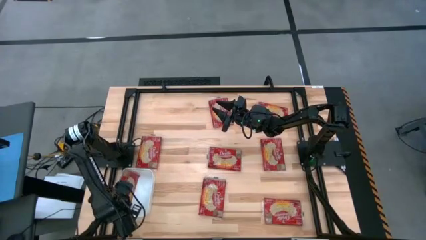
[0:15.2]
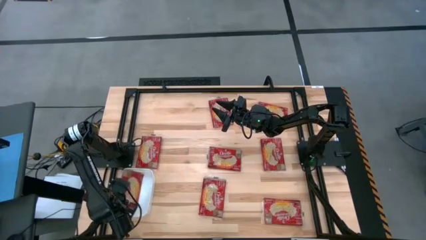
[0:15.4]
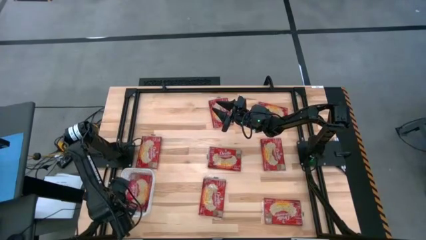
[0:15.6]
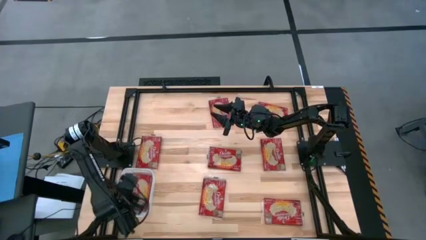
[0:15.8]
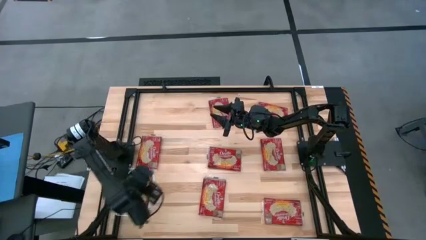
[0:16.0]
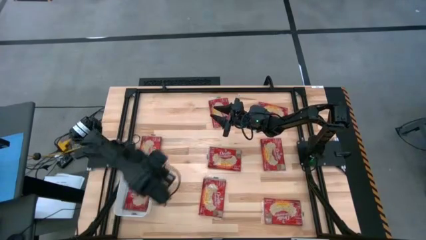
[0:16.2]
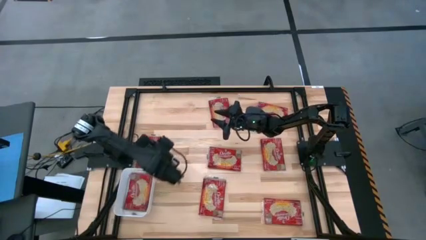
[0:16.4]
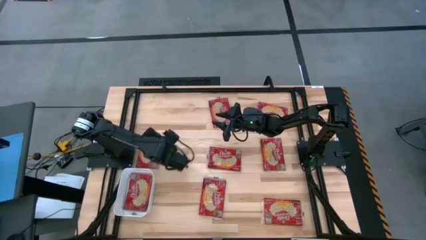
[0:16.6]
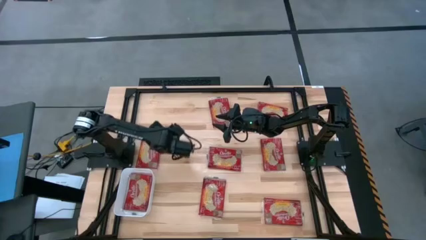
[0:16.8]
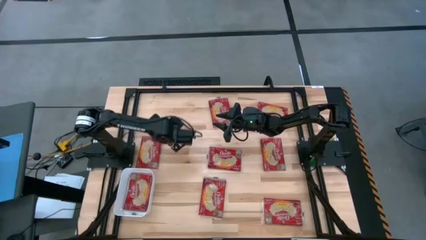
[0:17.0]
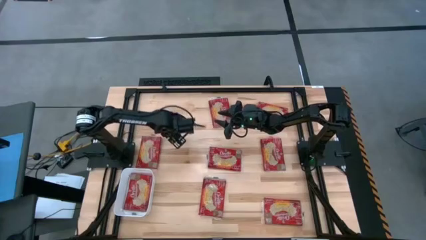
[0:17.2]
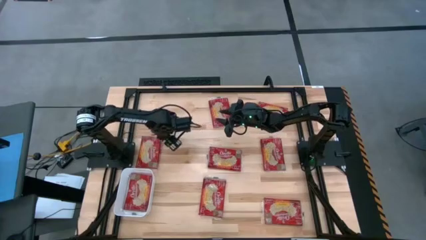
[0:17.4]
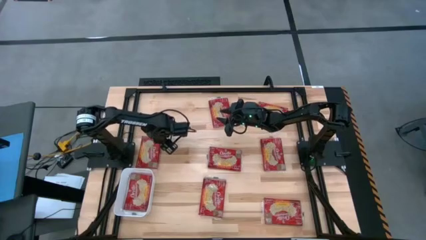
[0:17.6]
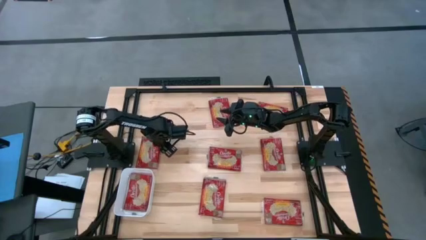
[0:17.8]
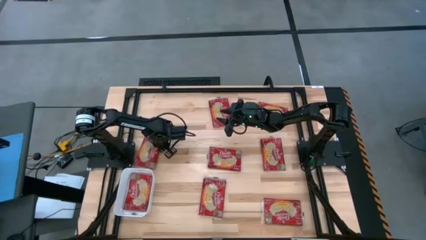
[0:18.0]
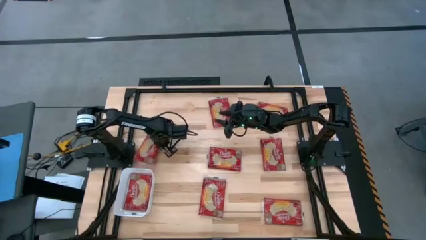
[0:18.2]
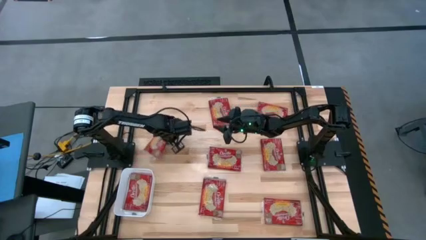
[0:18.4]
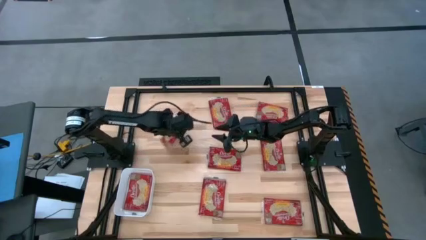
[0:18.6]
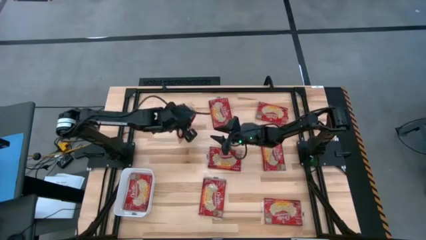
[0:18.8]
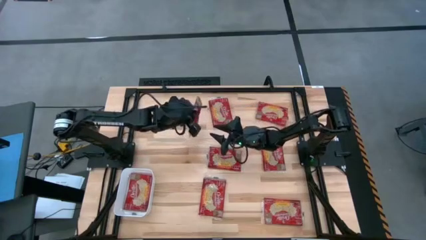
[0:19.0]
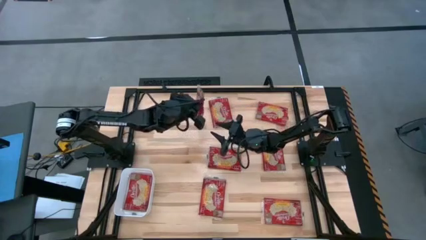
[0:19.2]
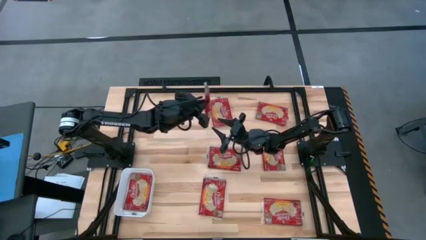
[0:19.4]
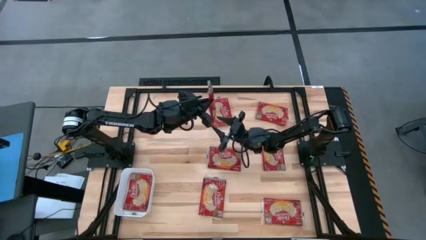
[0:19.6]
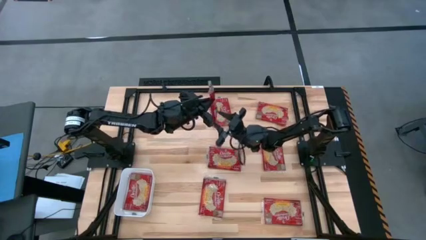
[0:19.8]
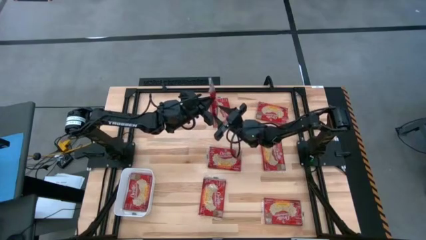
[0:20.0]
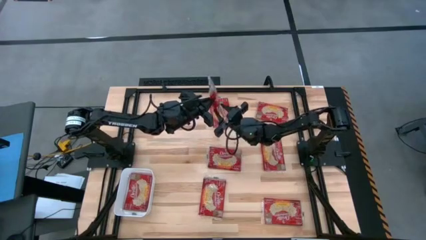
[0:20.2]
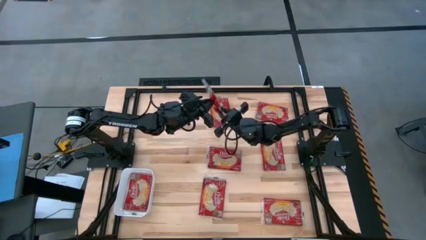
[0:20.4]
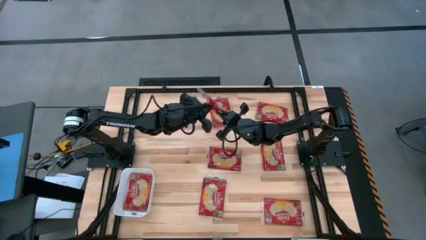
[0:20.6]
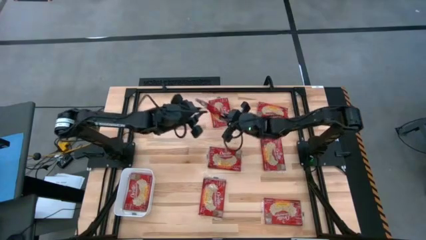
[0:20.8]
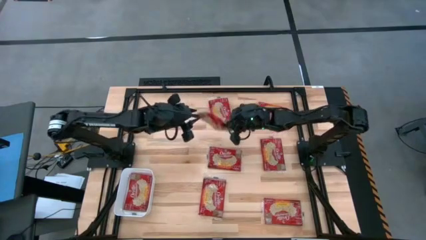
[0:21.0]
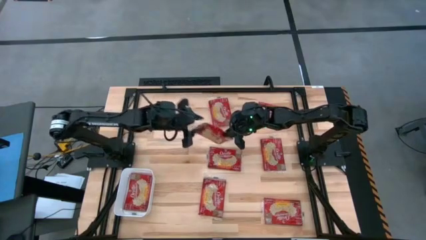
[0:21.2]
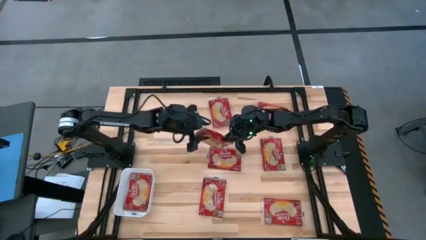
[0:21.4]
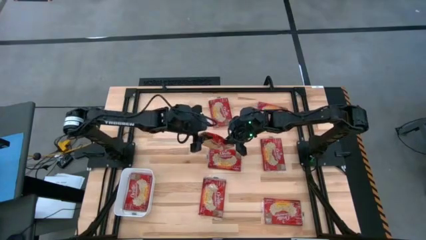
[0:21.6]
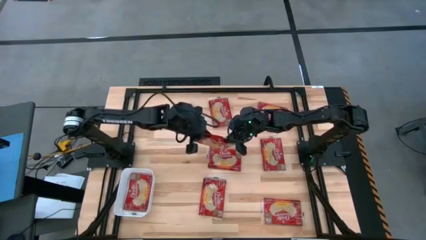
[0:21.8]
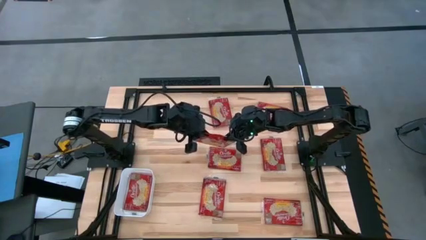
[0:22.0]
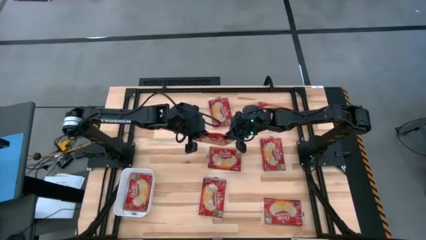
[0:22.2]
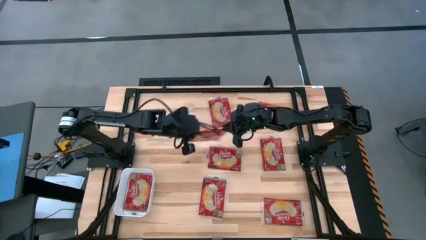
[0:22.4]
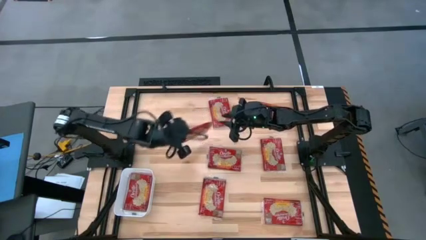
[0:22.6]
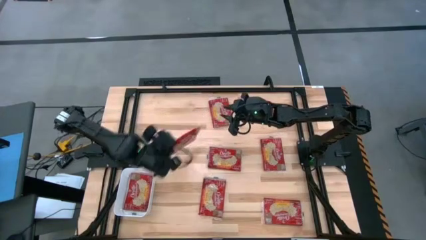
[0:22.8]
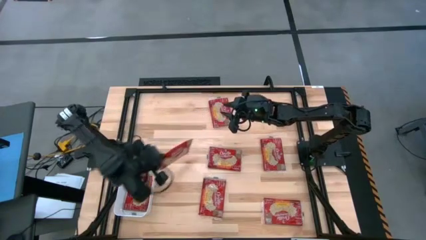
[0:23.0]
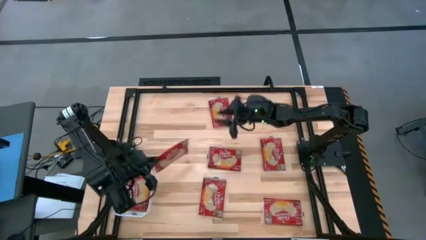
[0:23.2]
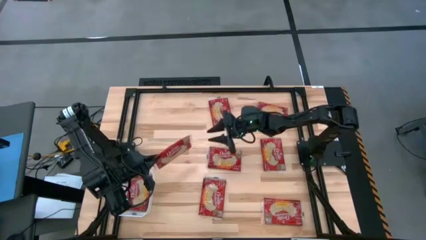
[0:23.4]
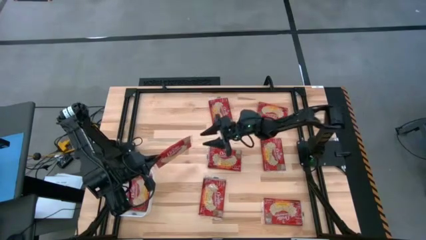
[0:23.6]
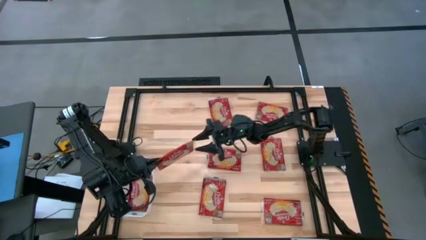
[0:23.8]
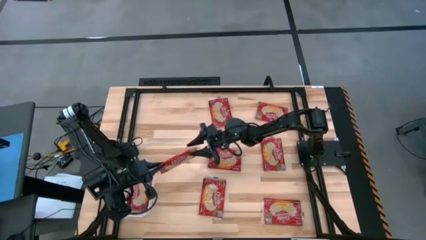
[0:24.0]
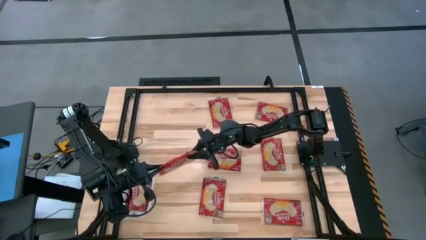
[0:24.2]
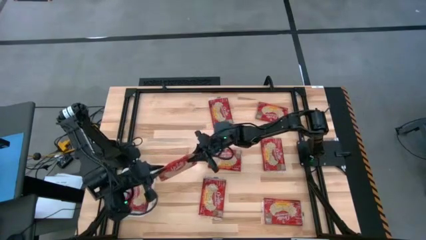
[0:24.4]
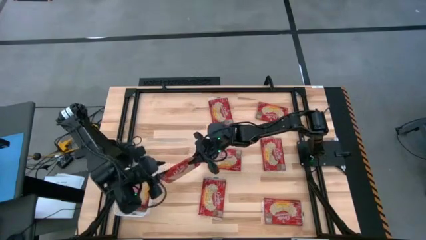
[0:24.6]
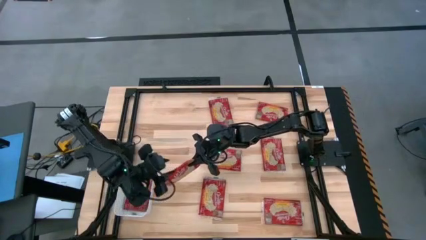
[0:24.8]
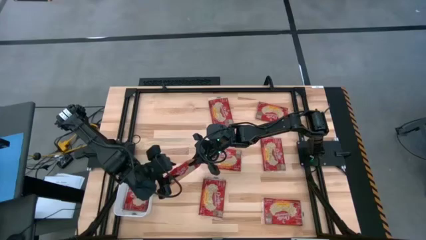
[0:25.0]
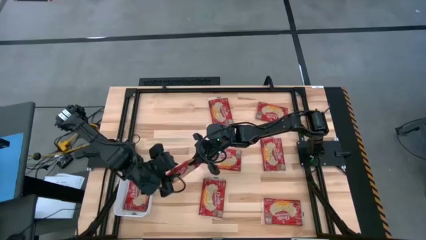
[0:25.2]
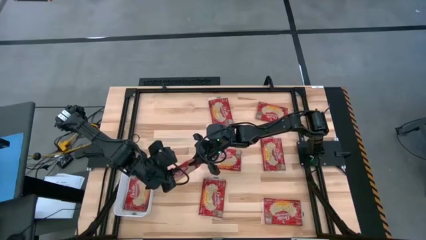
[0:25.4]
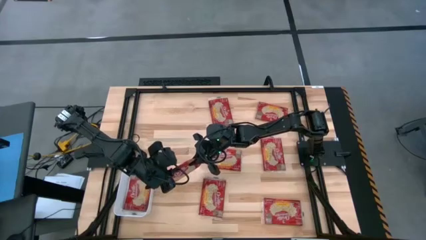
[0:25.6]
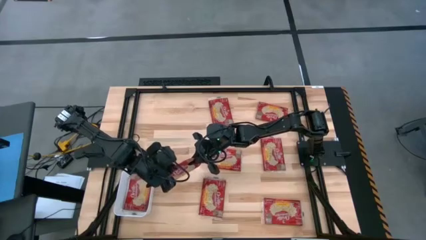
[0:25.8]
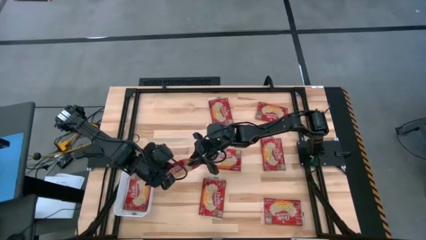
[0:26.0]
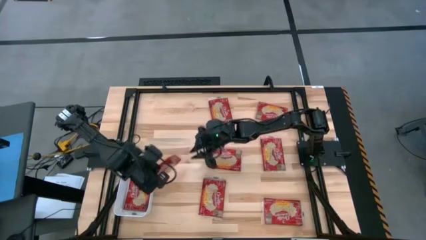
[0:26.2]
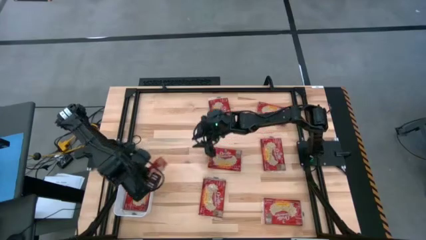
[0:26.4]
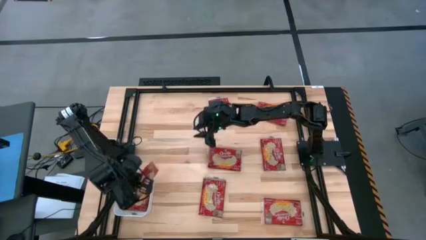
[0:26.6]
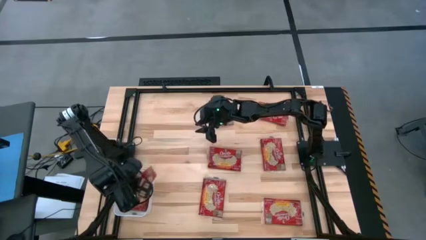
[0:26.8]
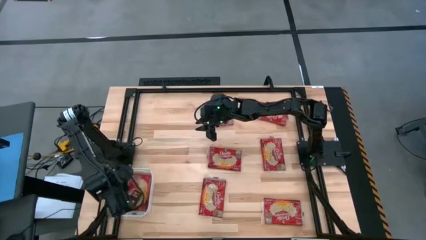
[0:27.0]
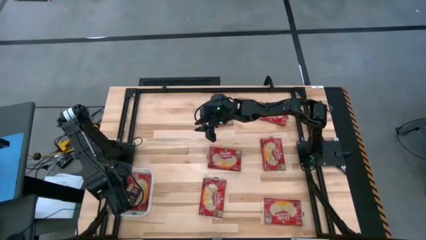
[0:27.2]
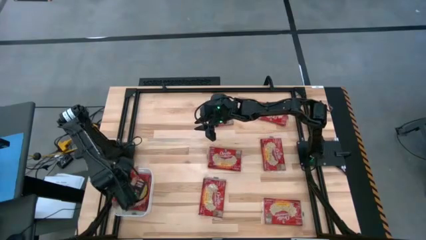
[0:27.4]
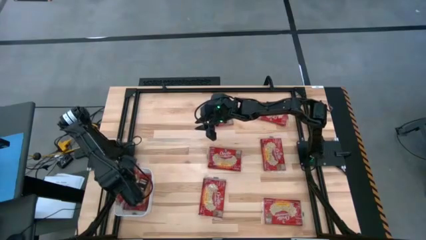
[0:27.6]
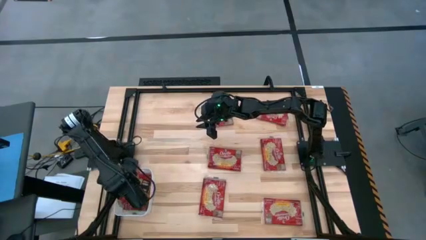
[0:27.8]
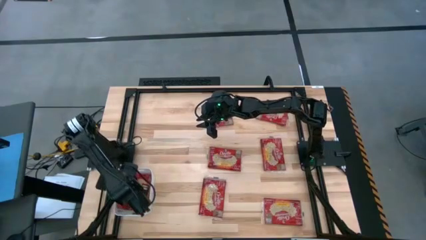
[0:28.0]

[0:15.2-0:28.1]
Task: Sort popcorn bags into baskets
Put the red popcorn bag into the white bin

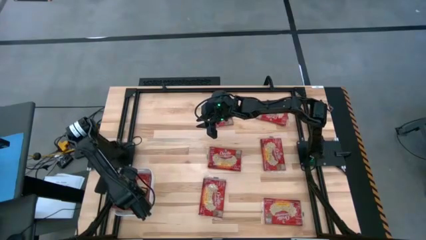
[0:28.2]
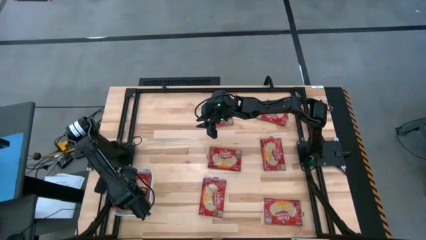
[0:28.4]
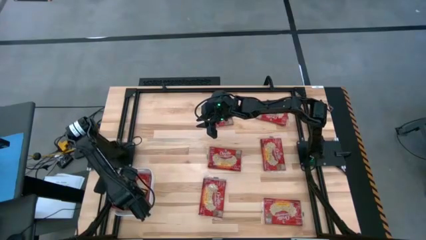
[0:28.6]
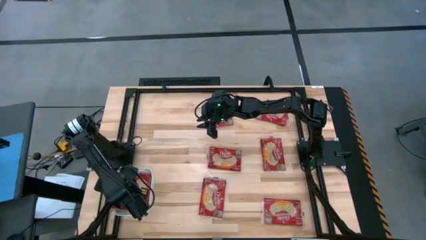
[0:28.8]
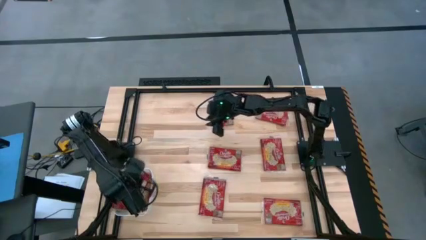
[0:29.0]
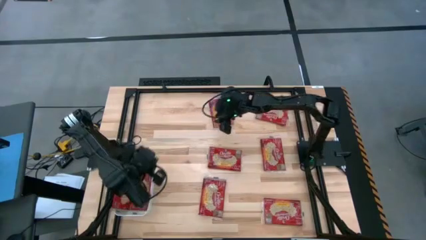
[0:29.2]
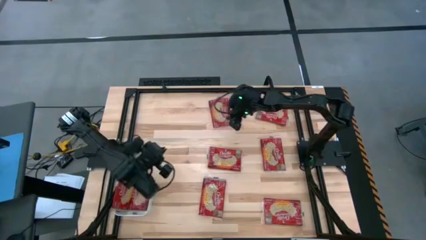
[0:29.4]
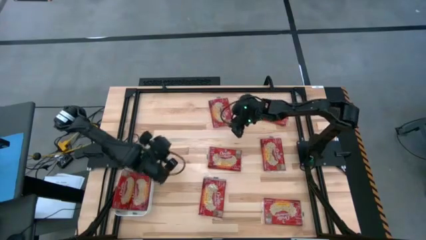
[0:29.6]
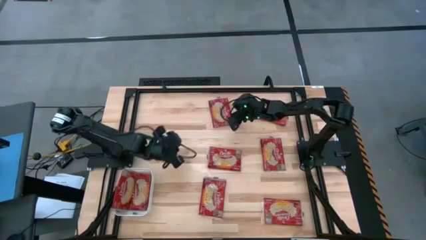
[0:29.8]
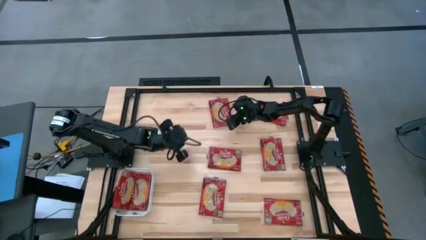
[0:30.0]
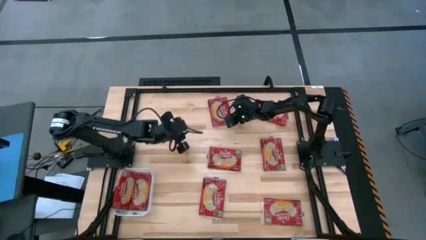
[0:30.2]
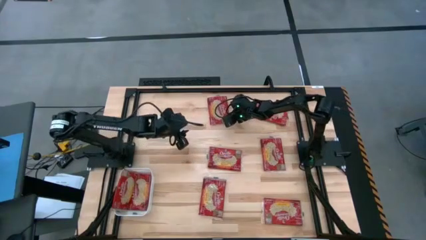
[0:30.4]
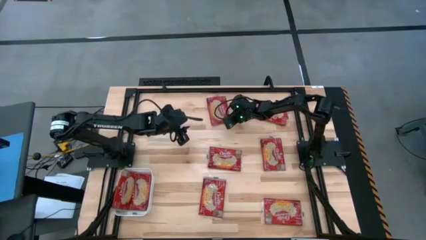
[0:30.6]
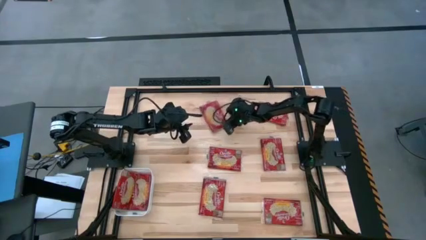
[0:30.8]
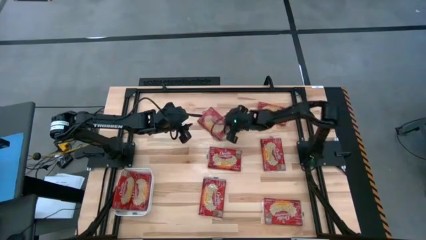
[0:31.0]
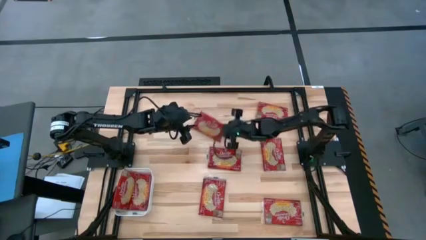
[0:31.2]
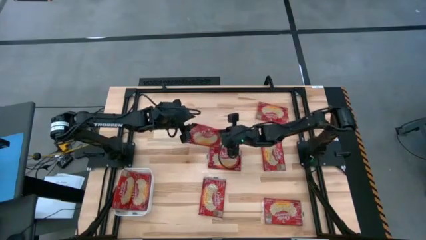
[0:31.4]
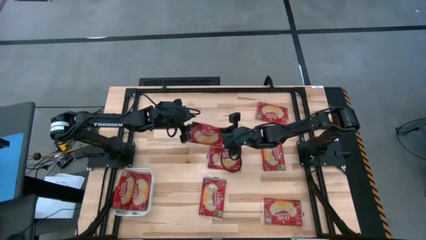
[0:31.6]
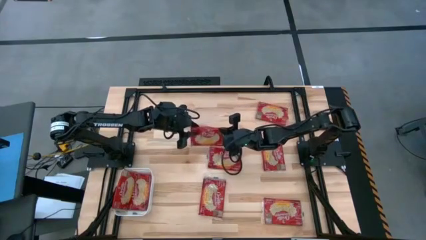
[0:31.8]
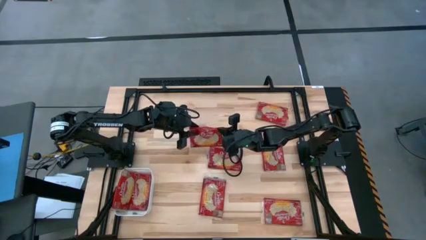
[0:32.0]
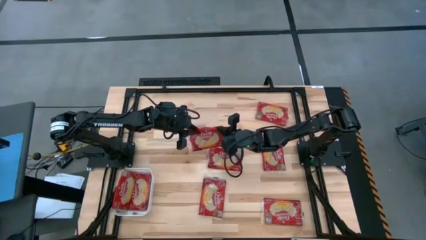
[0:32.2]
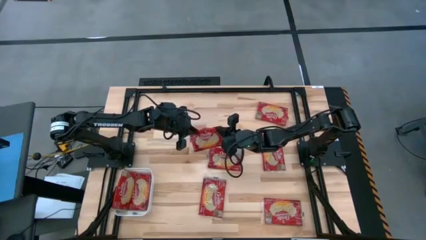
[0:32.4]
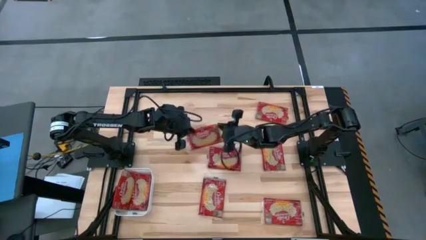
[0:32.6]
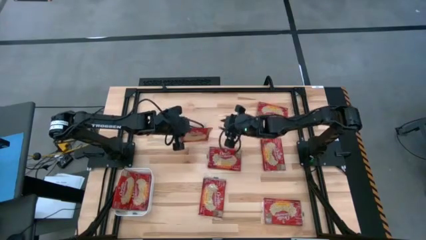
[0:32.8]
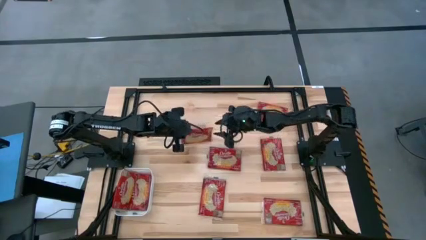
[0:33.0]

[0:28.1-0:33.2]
Put the red popcorn bag into the white bin
